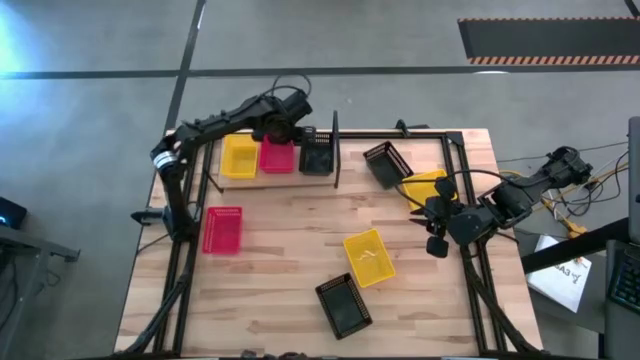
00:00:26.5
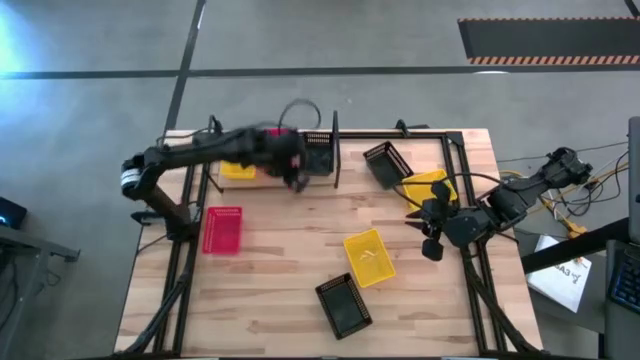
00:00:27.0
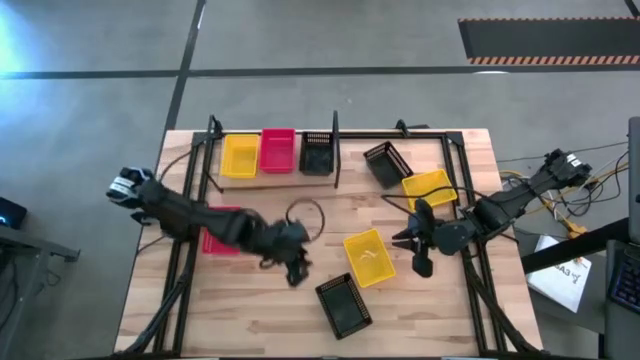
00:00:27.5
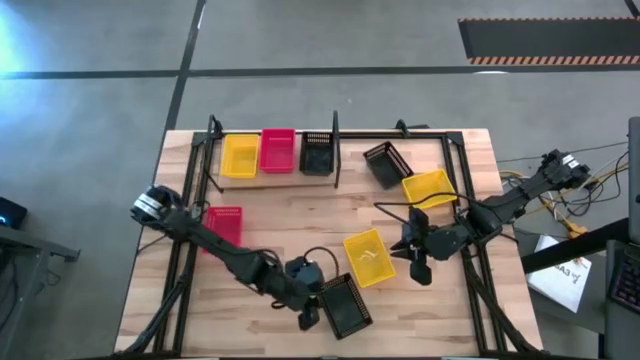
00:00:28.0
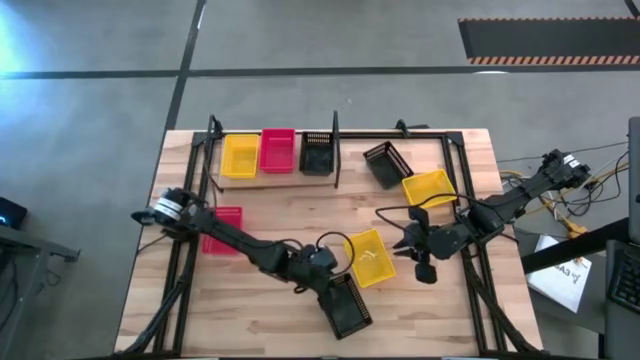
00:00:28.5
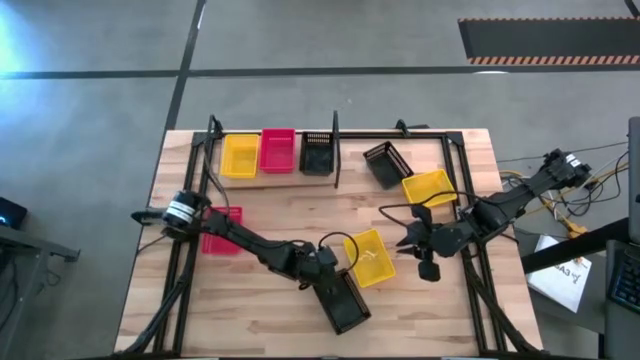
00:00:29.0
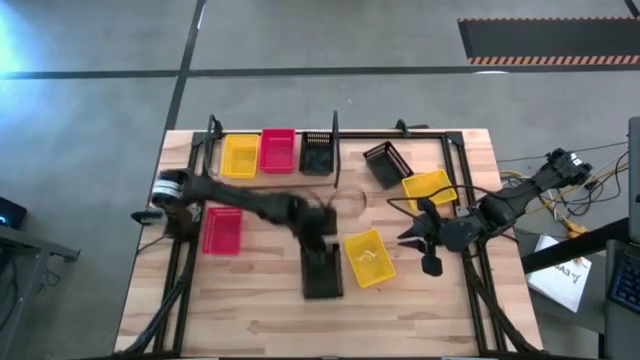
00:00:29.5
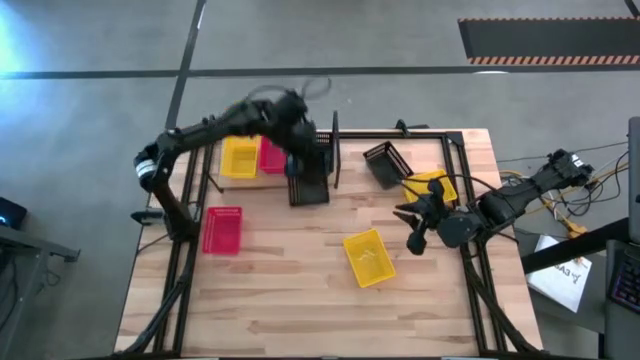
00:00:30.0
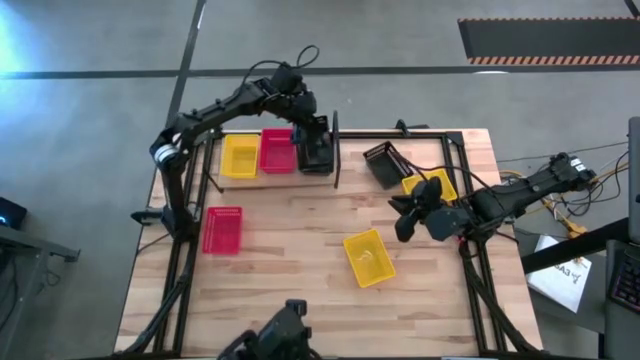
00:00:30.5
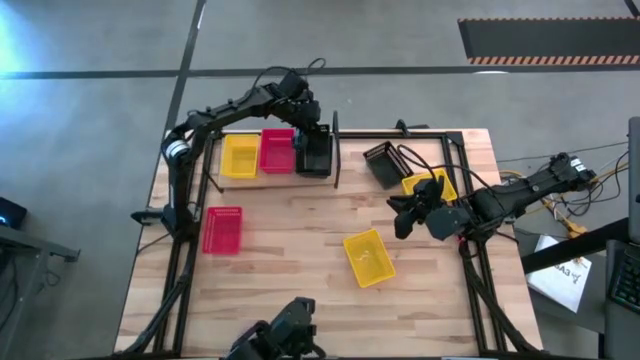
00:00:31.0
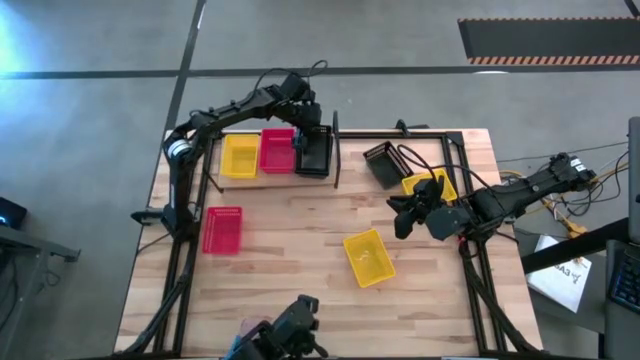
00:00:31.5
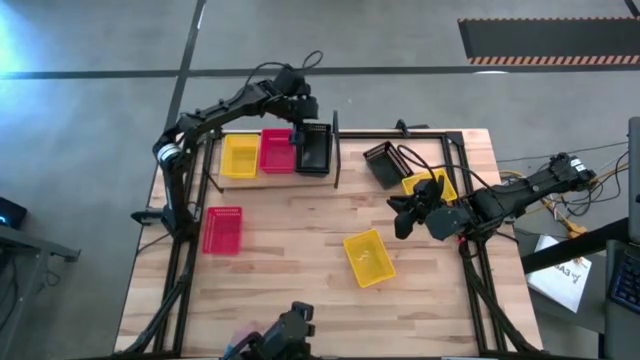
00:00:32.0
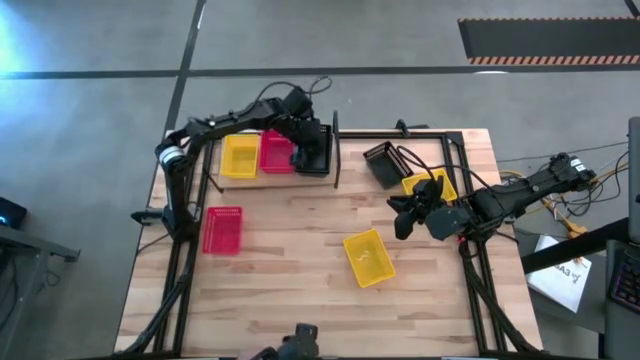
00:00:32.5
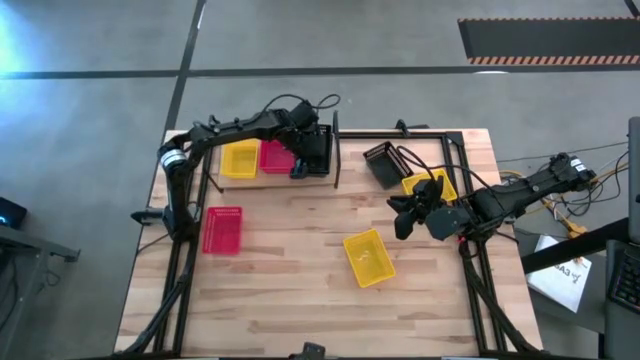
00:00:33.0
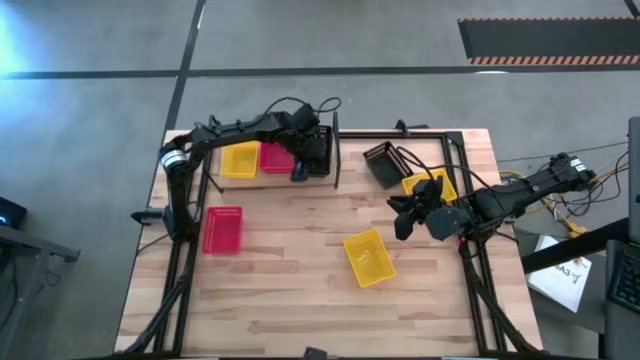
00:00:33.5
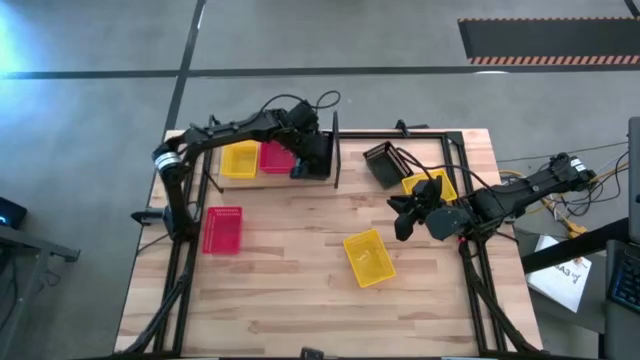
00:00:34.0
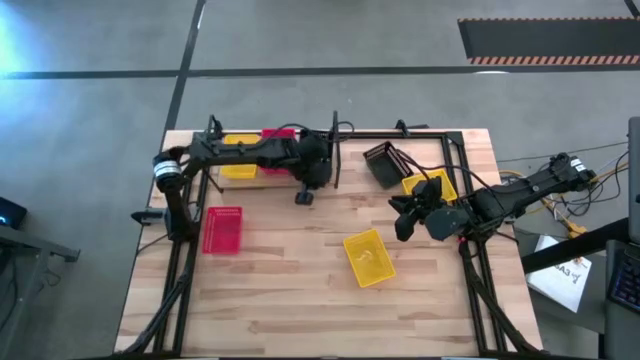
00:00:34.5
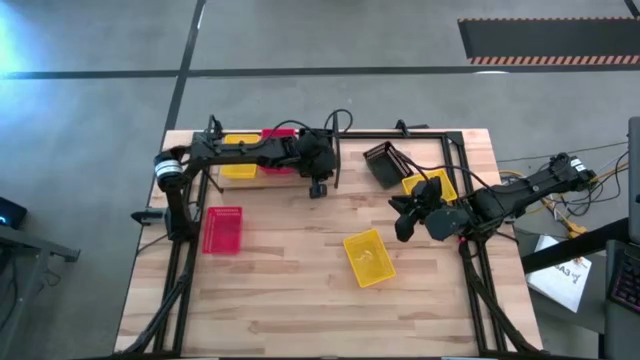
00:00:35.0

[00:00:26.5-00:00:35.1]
Task: Stack baskets on shelf by color
Stack the bottom black bin on top of the black bin on the shelf

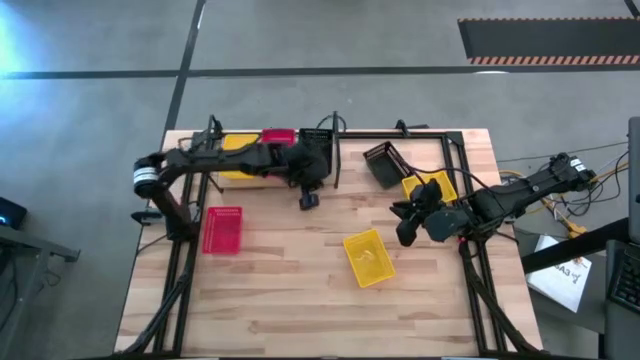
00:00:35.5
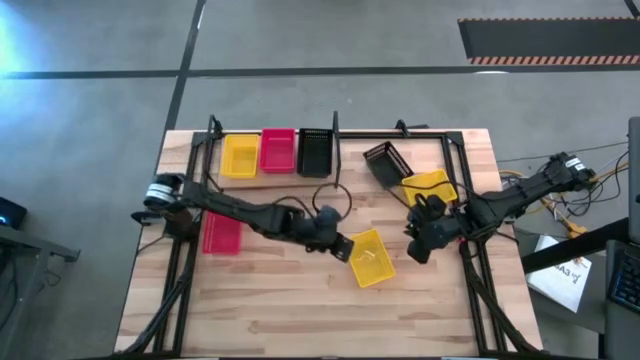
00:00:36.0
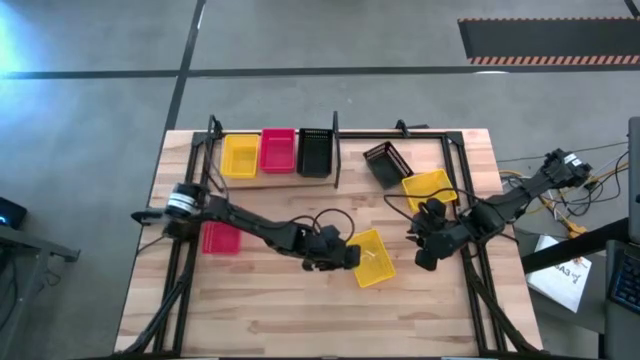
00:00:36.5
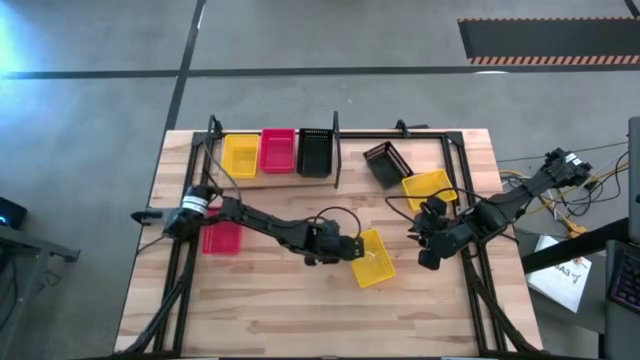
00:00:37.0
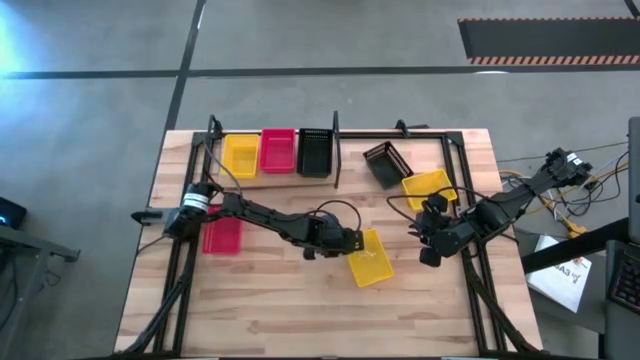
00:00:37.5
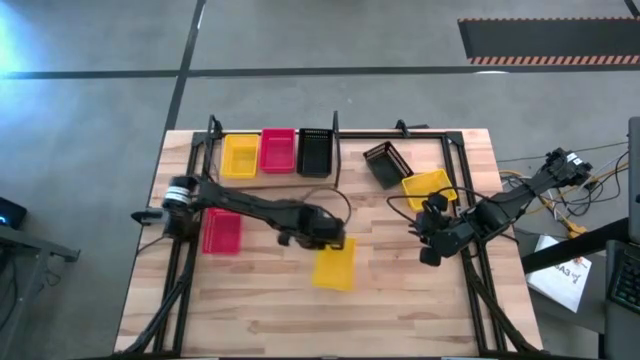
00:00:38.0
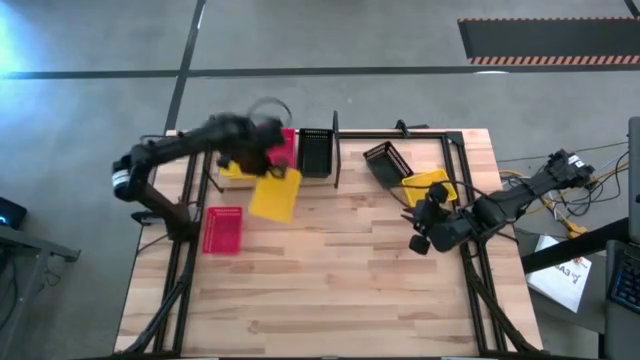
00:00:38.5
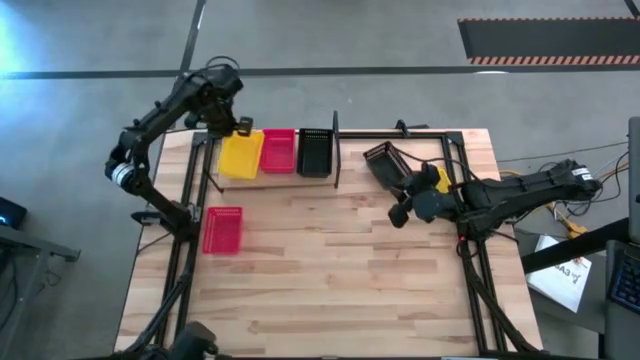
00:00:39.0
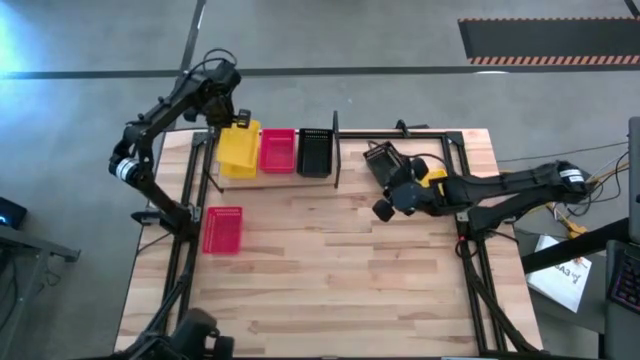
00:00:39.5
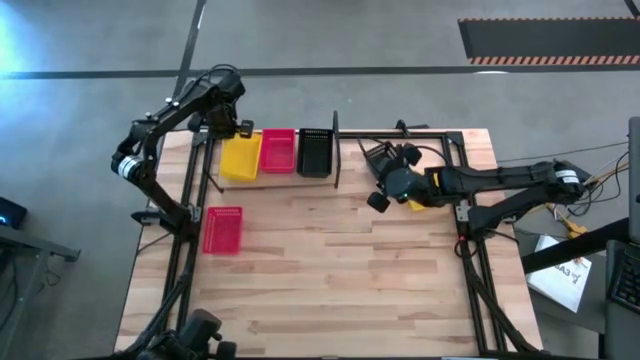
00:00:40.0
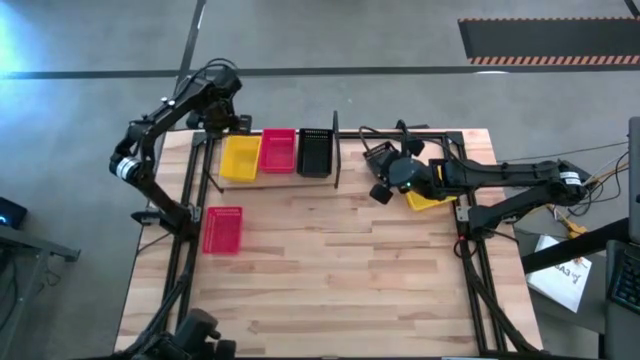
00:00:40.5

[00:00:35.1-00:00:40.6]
Stack the left yellow bin on top of the yellow bin on the shelf

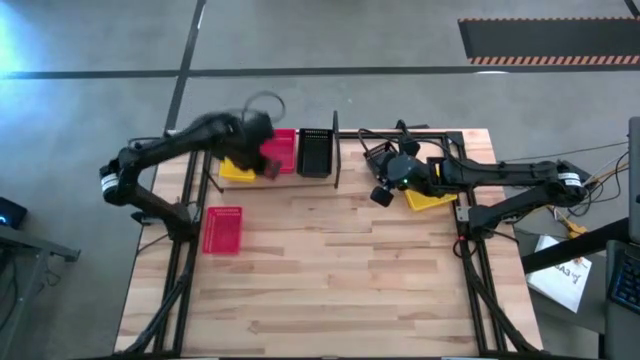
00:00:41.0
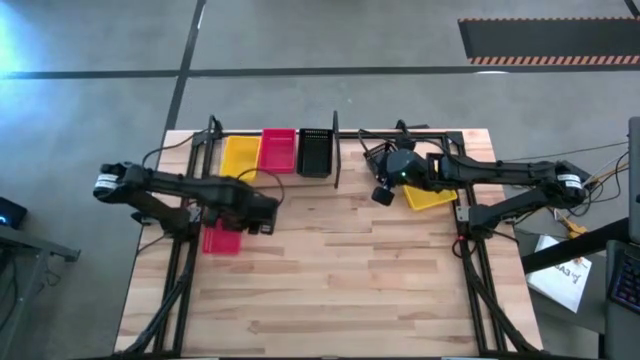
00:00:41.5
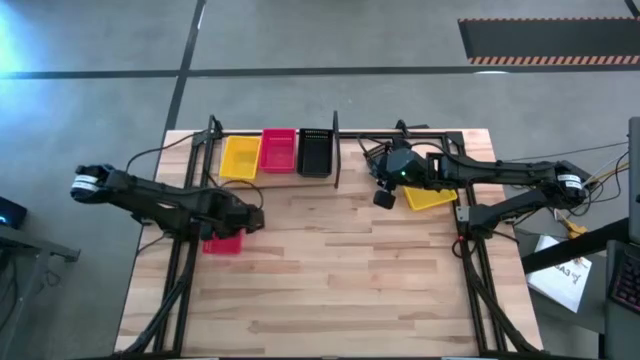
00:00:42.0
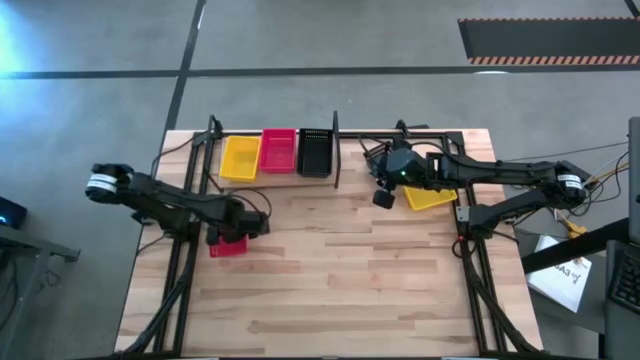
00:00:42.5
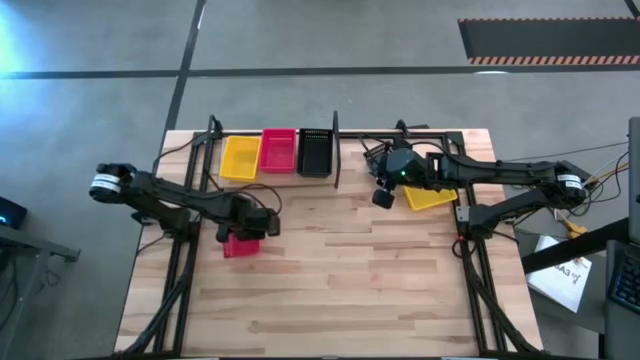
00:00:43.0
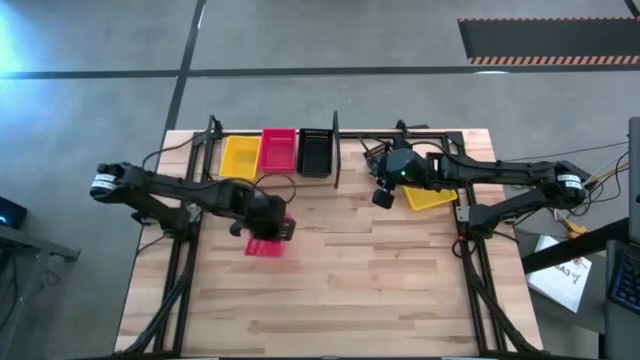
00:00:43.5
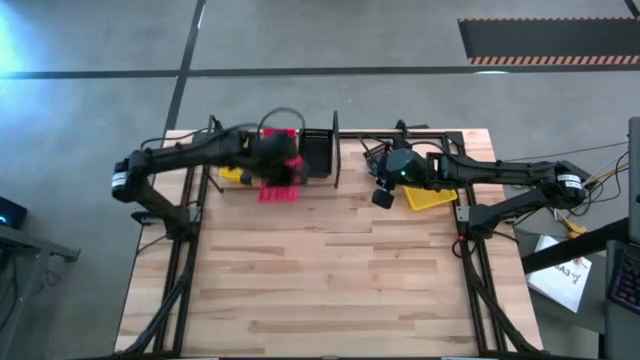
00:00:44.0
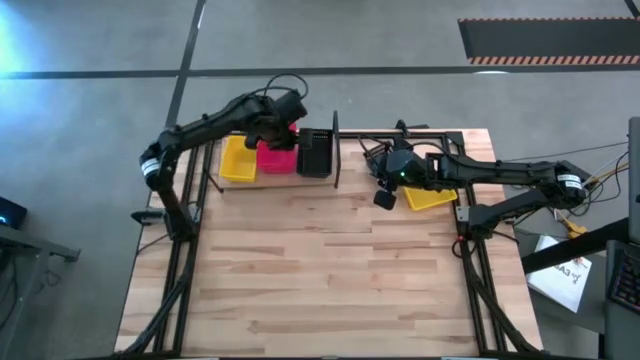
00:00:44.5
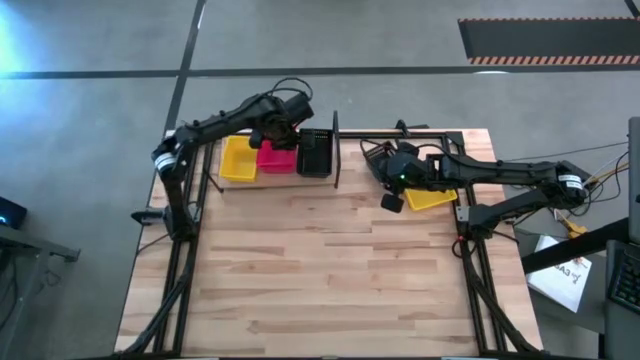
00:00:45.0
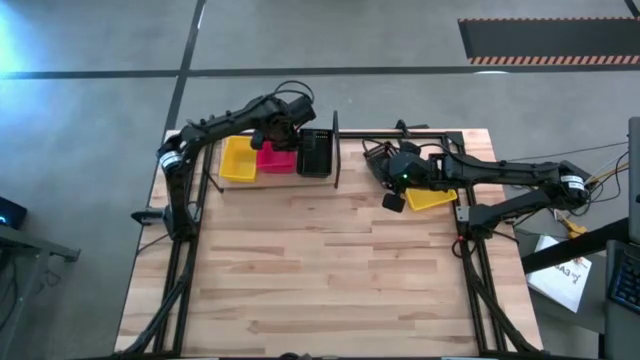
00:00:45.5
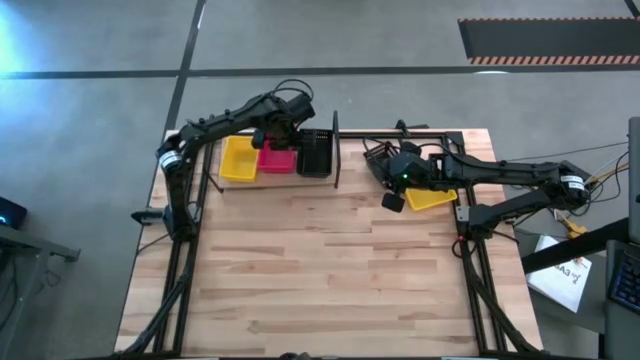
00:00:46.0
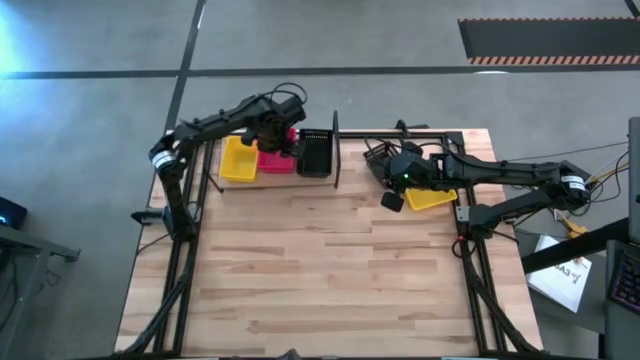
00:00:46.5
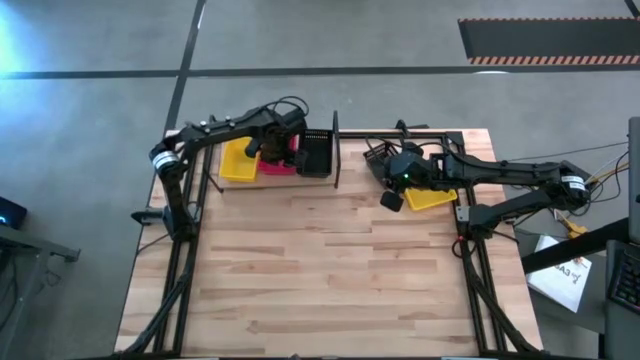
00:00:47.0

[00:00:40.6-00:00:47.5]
Stack the red bin on top of the red bin on the shelf
